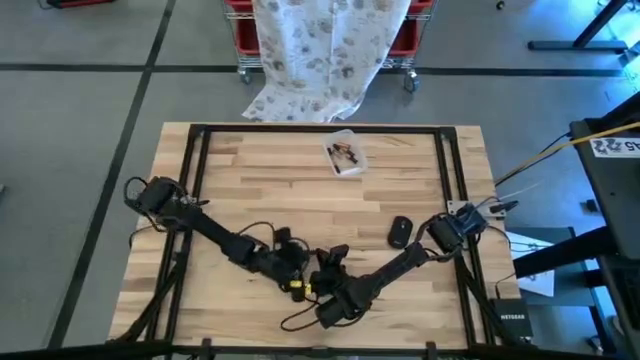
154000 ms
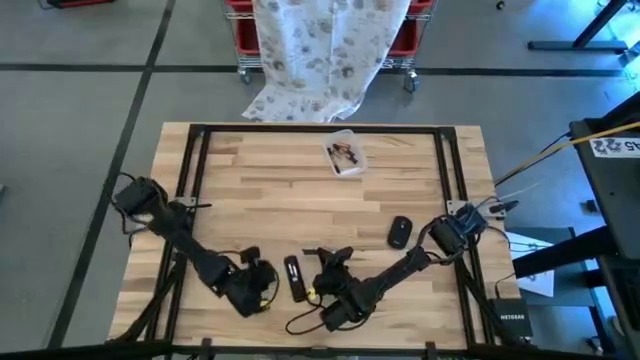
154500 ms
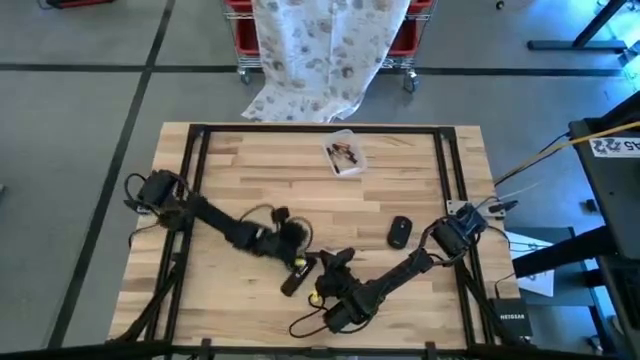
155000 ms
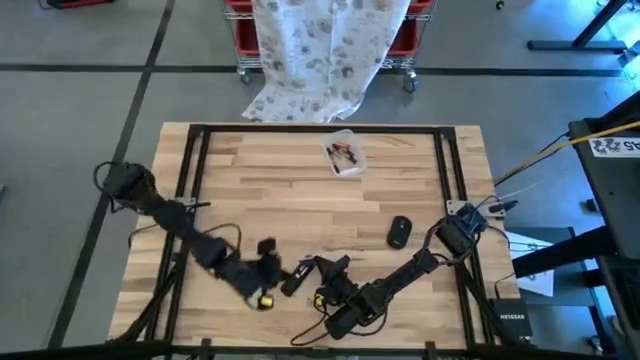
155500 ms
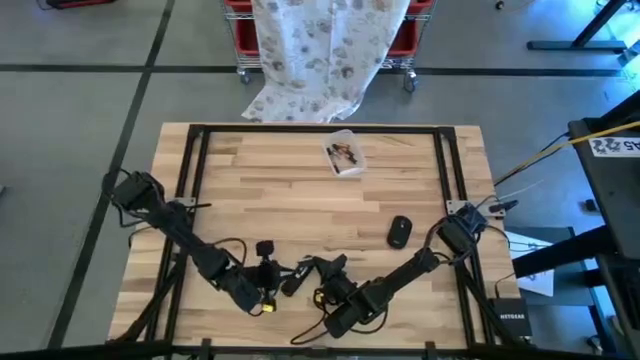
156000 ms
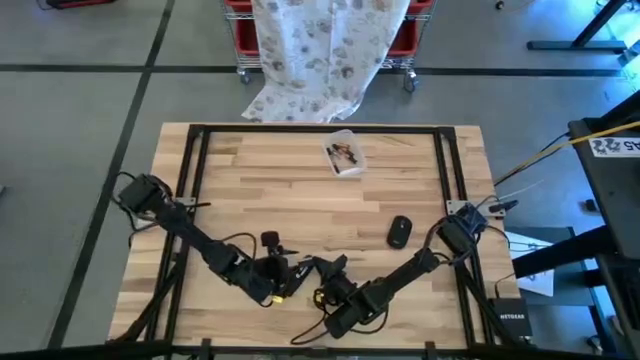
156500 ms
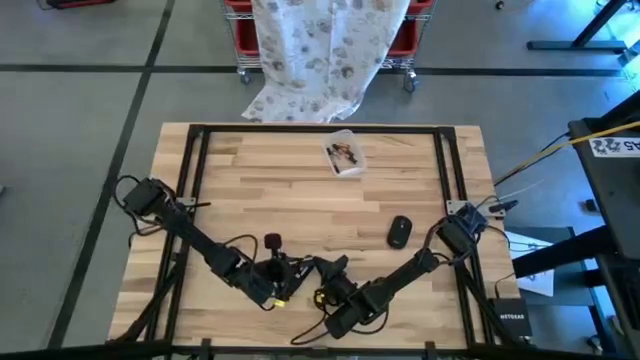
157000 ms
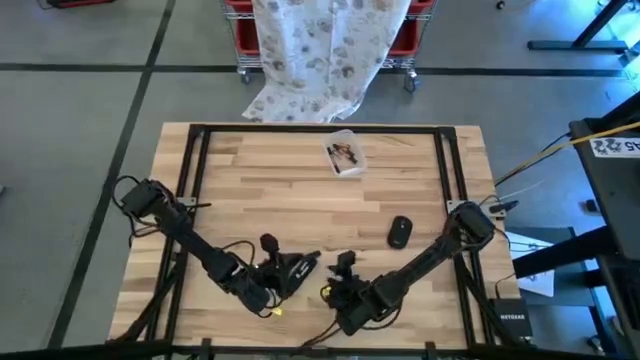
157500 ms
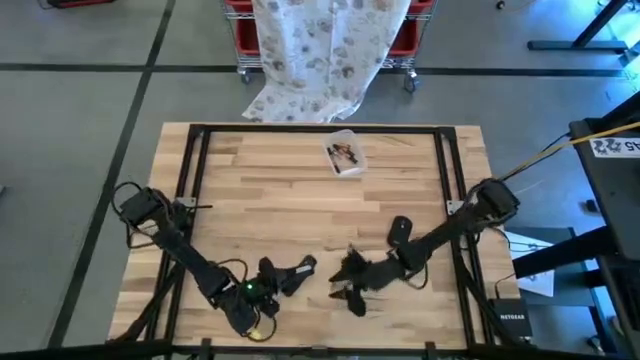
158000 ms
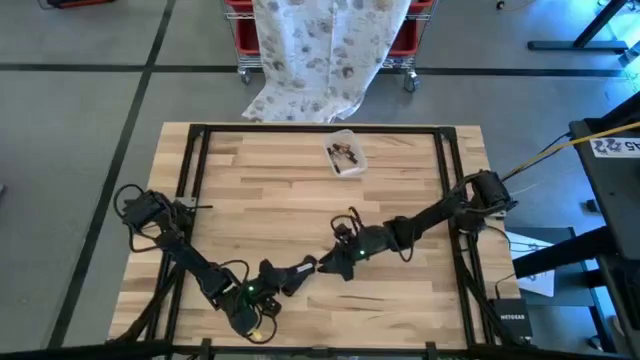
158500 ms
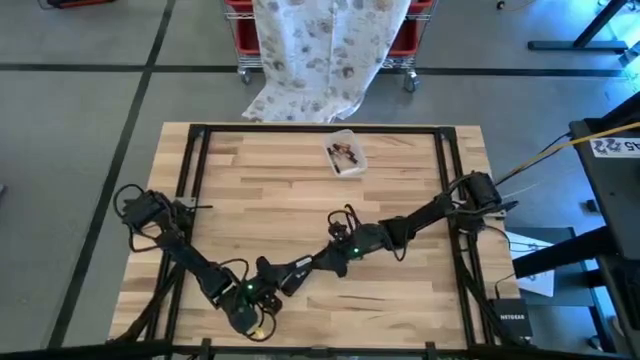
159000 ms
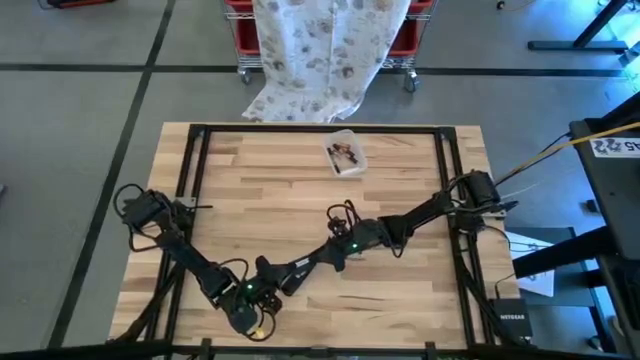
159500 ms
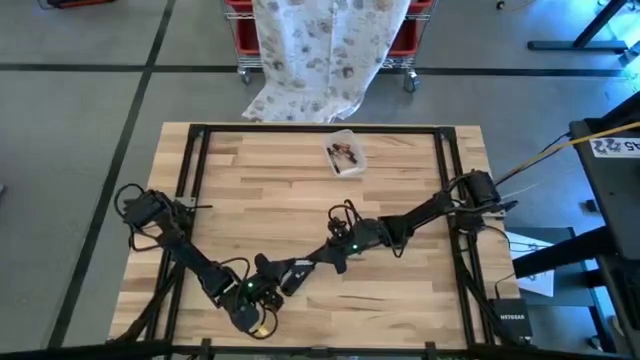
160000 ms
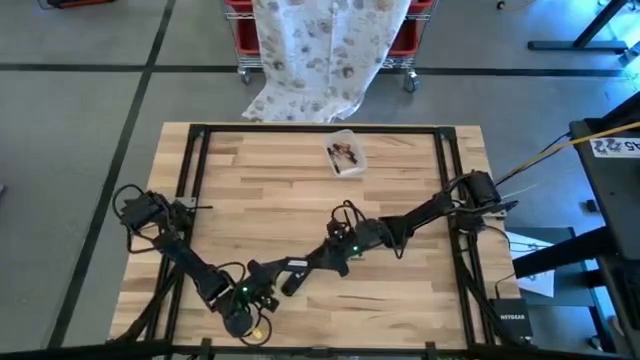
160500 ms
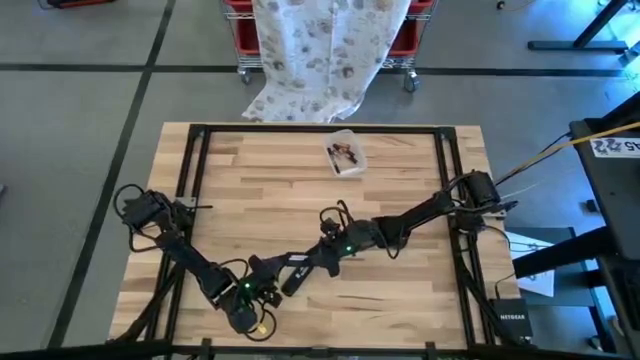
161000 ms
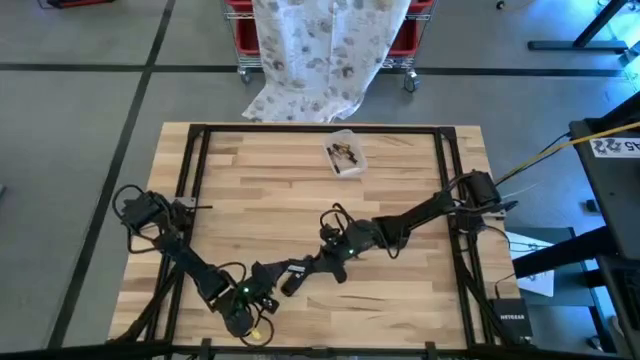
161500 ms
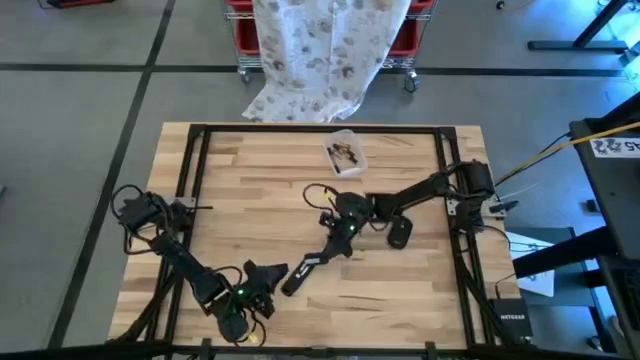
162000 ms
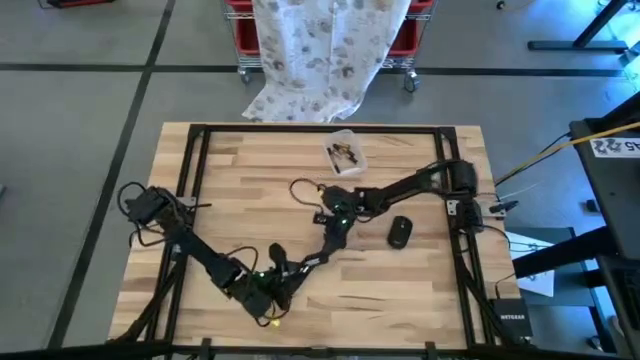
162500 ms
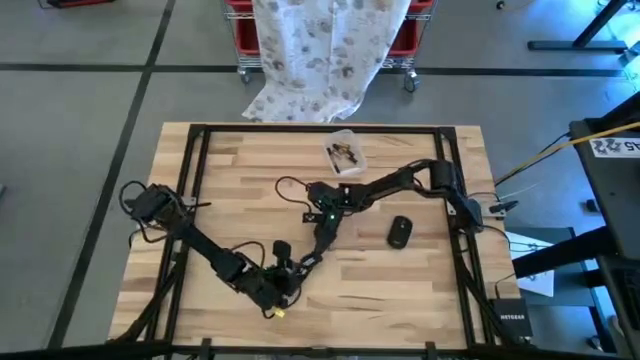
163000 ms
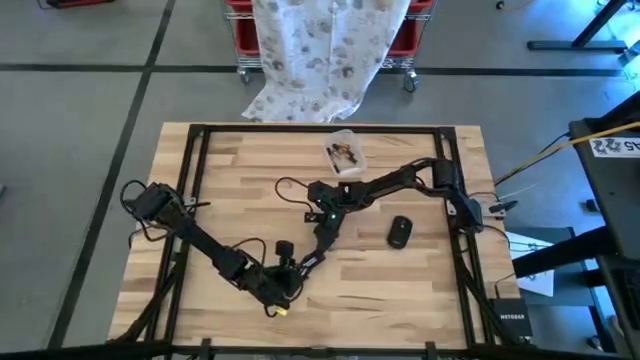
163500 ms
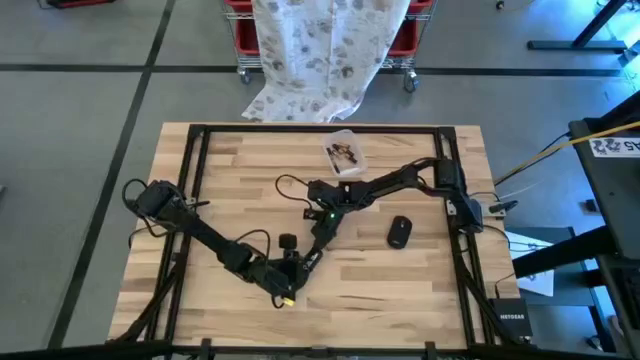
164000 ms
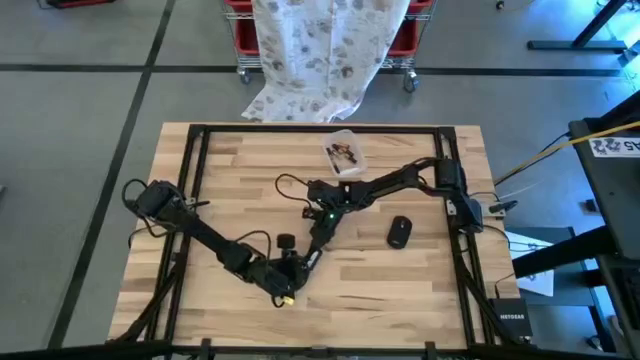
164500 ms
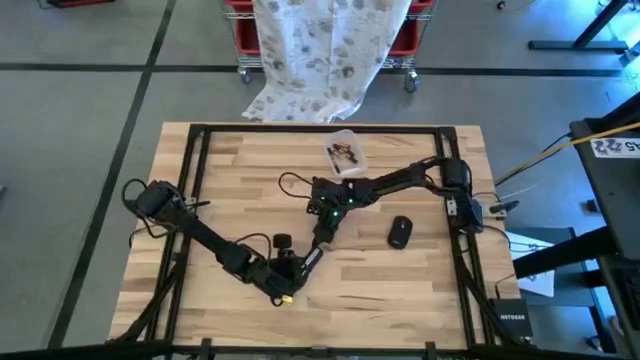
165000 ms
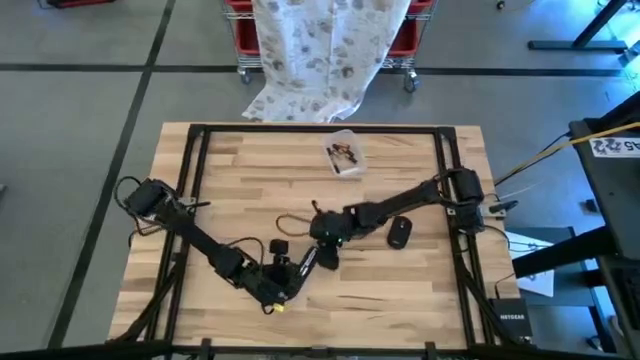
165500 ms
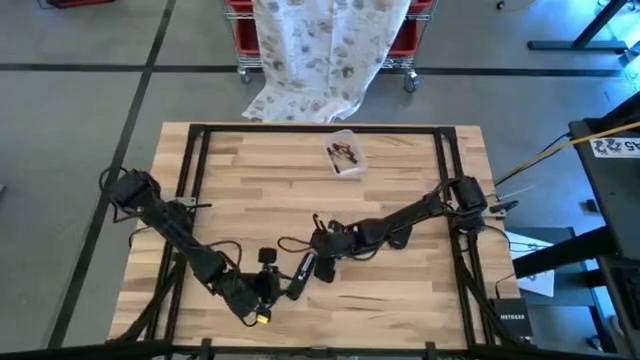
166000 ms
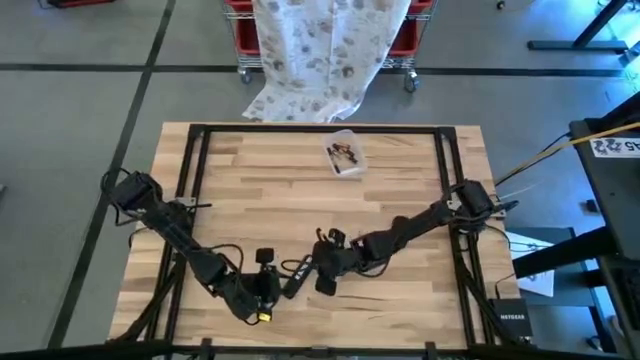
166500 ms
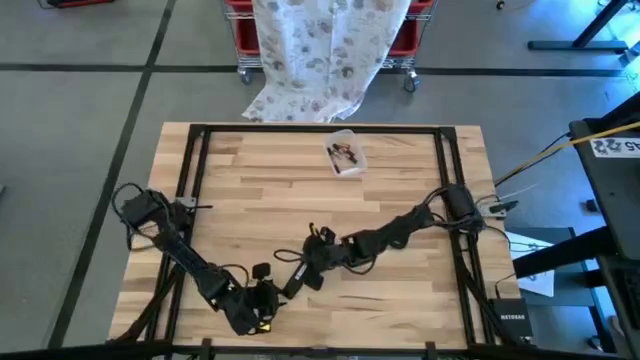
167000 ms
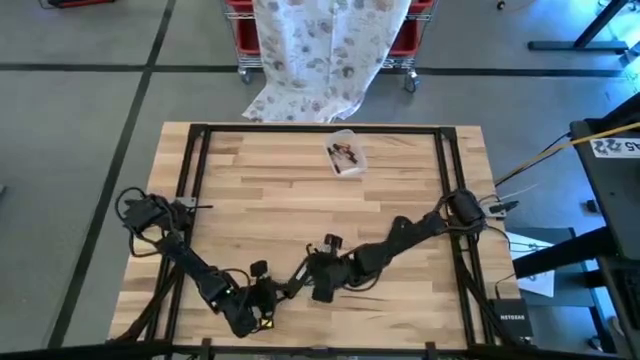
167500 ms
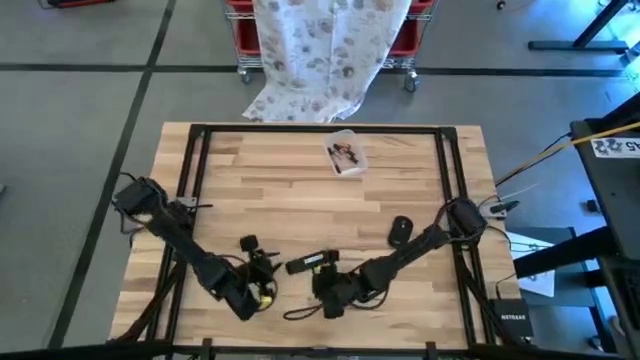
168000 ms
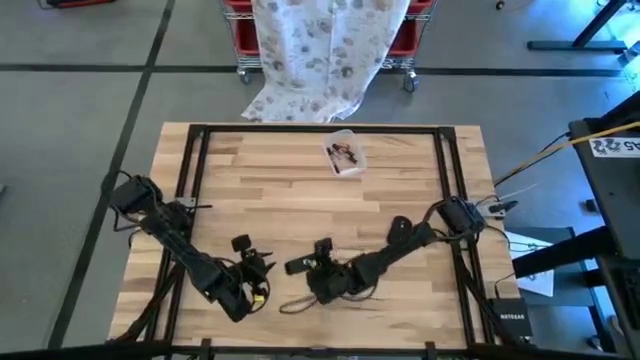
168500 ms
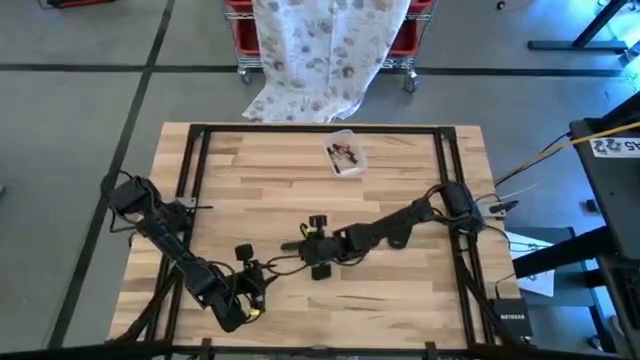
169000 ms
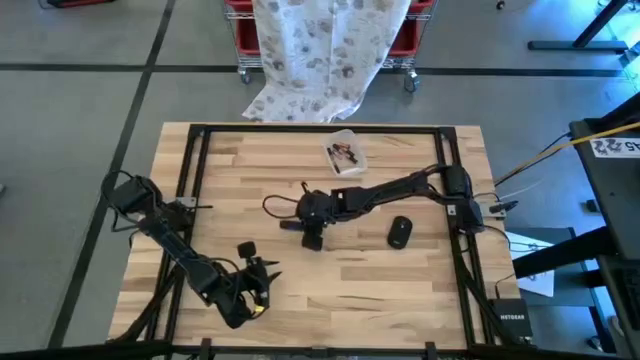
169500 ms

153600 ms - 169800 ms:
Task: Insert battery
Close the remote control cover

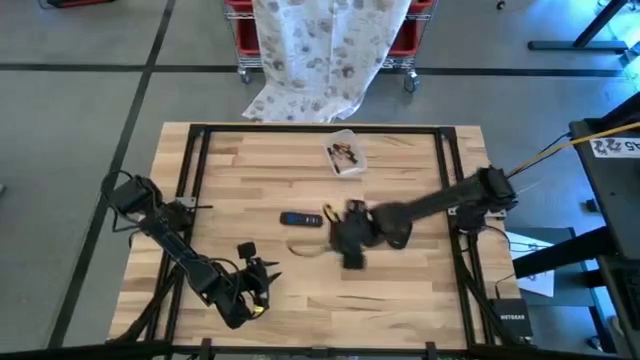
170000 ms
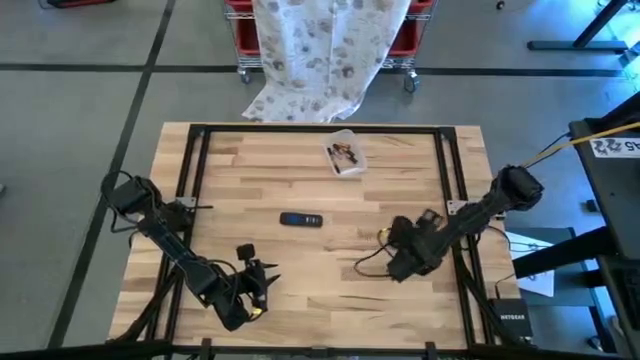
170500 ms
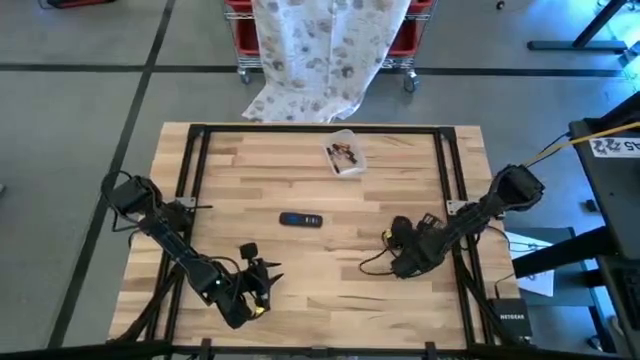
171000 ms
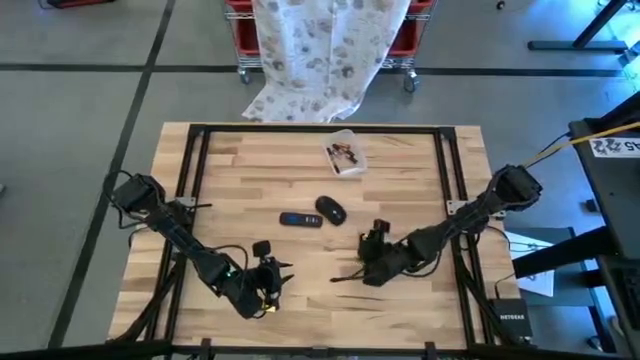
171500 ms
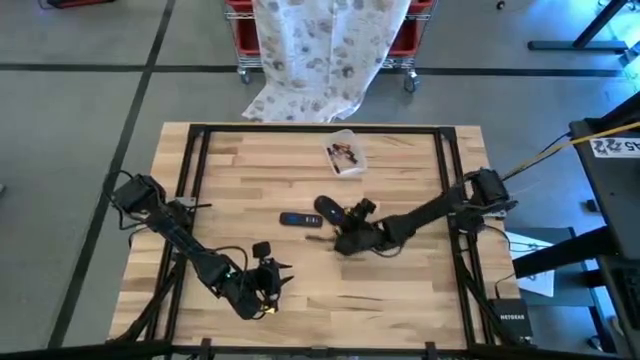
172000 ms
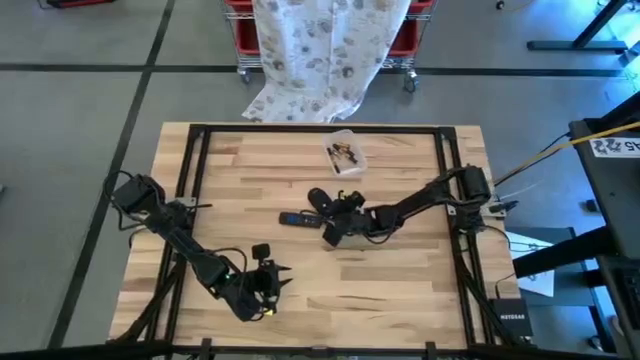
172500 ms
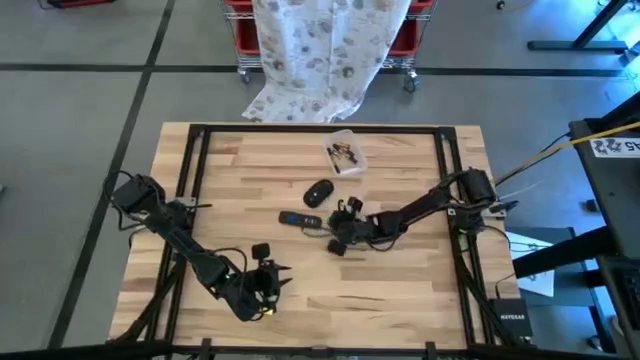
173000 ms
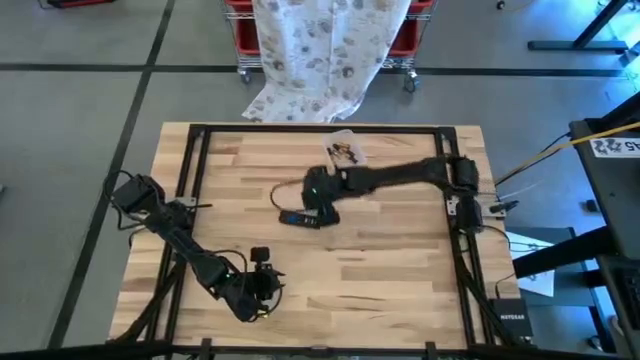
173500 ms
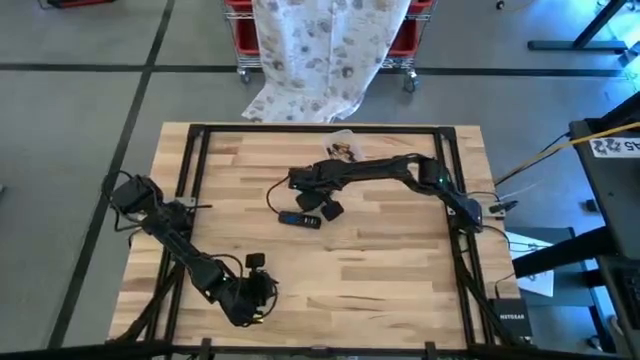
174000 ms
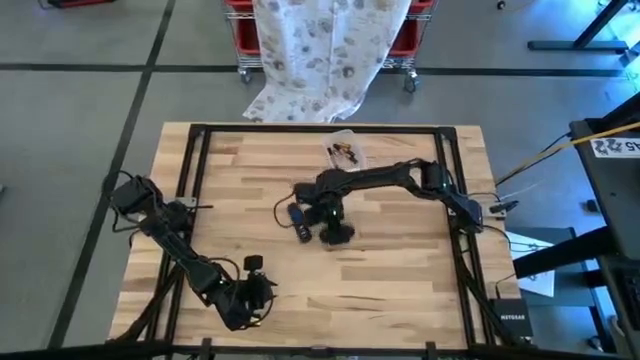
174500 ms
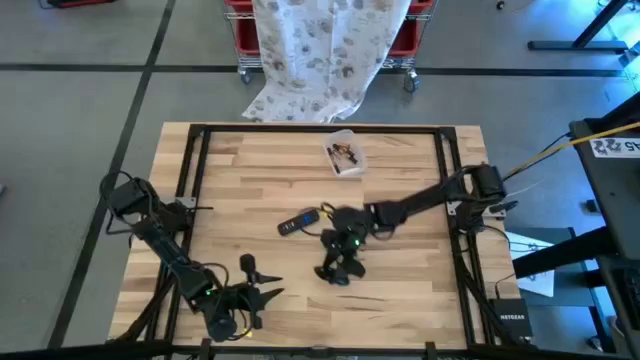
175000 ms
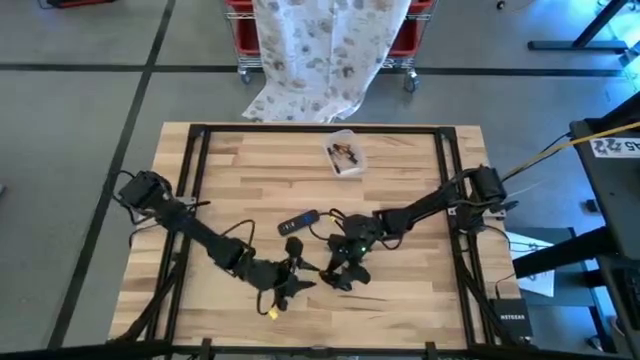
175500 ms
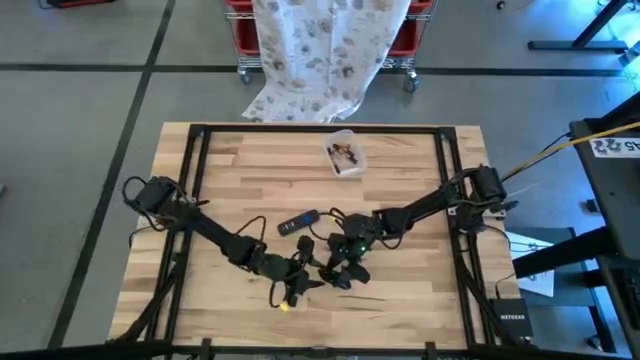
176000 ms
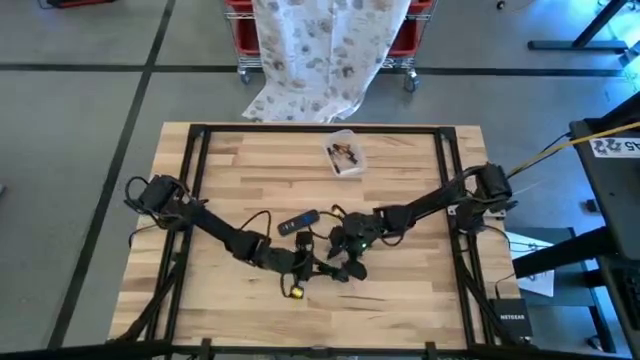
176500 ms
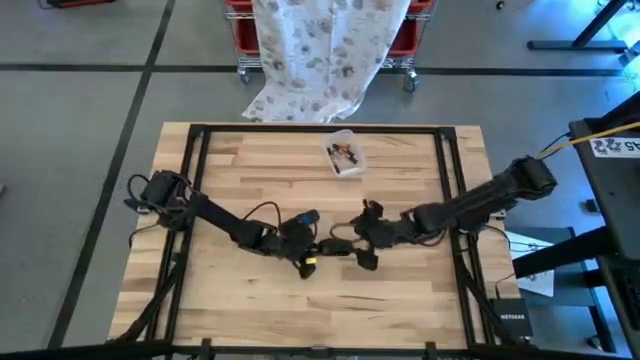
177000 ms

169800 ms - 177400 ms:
Move the wireless mouse to the center of the table
